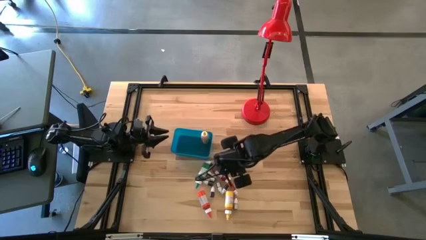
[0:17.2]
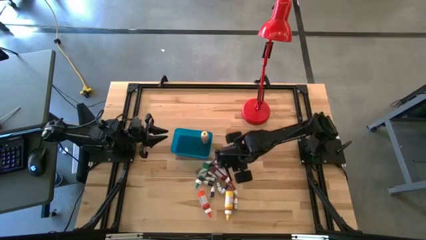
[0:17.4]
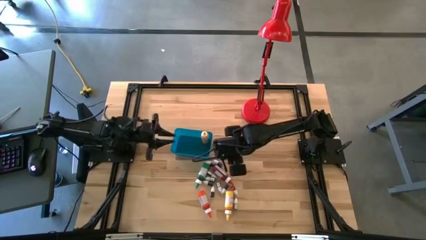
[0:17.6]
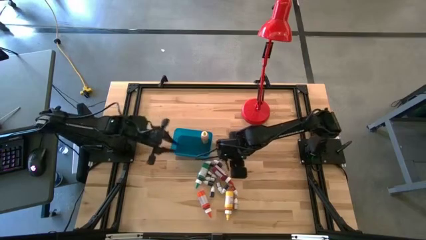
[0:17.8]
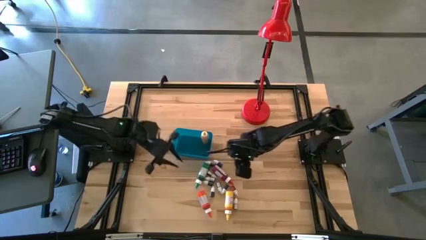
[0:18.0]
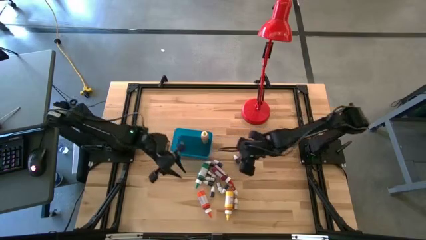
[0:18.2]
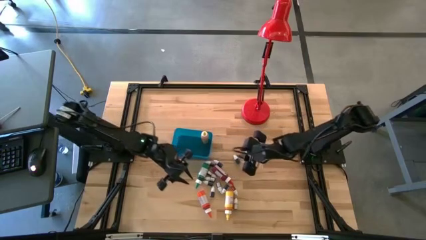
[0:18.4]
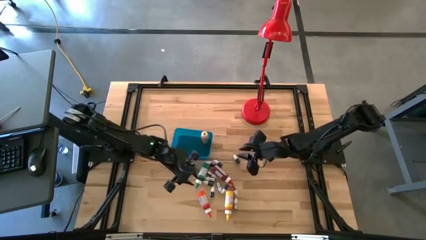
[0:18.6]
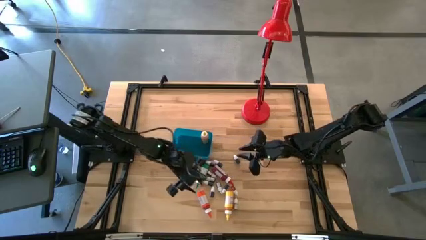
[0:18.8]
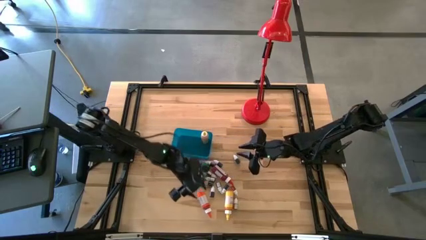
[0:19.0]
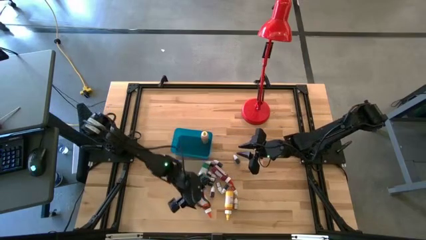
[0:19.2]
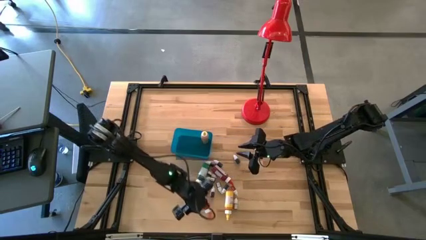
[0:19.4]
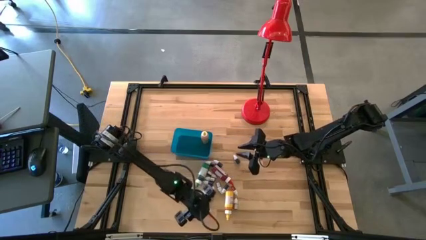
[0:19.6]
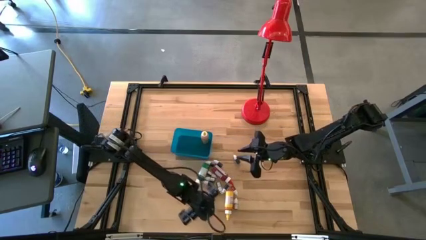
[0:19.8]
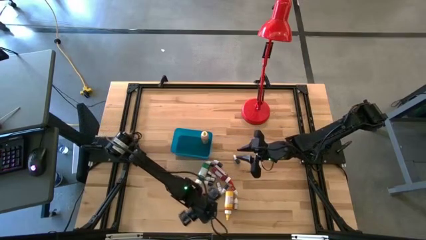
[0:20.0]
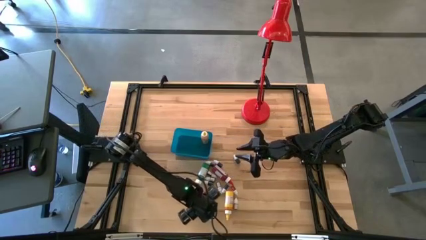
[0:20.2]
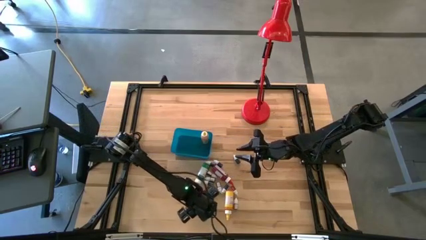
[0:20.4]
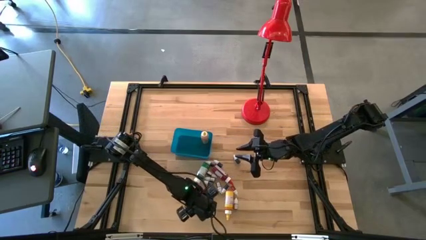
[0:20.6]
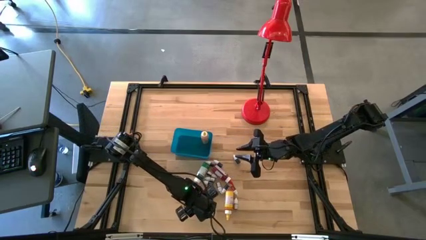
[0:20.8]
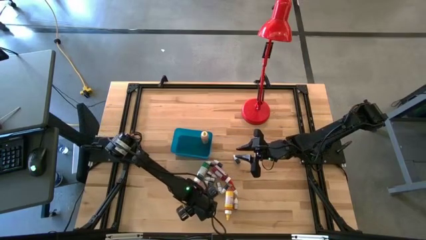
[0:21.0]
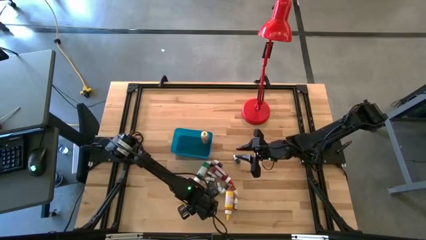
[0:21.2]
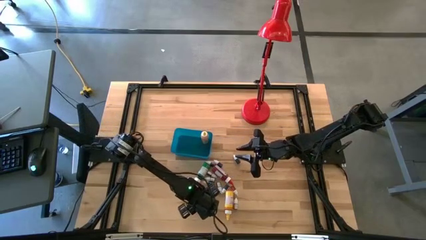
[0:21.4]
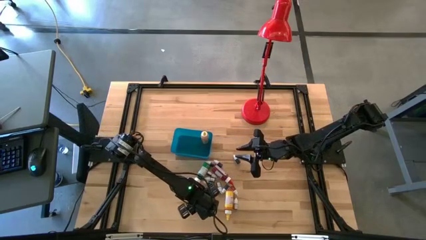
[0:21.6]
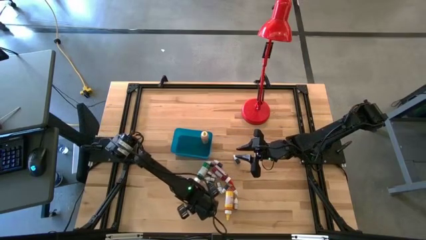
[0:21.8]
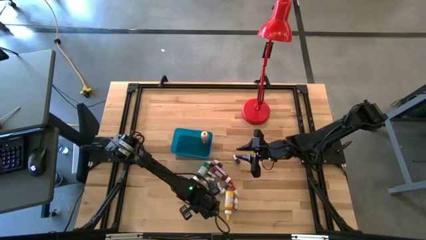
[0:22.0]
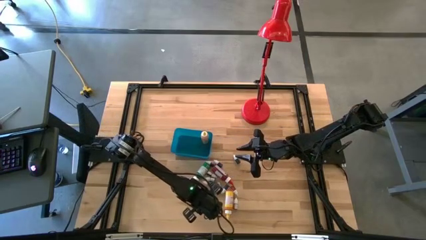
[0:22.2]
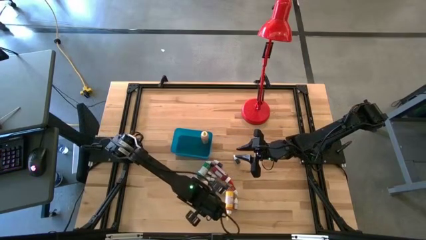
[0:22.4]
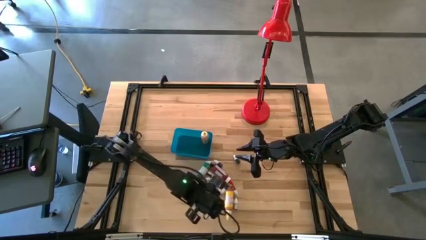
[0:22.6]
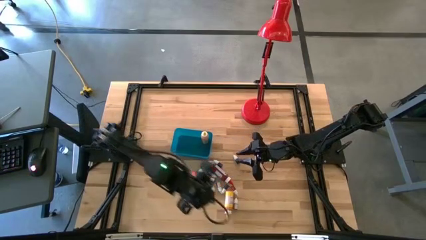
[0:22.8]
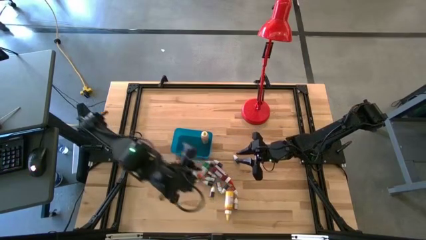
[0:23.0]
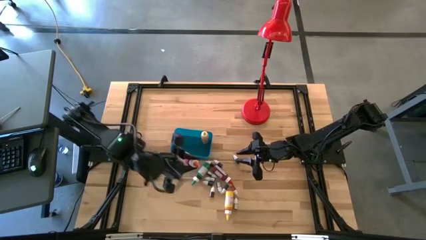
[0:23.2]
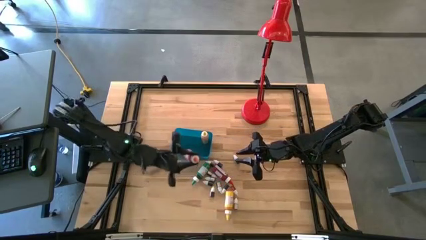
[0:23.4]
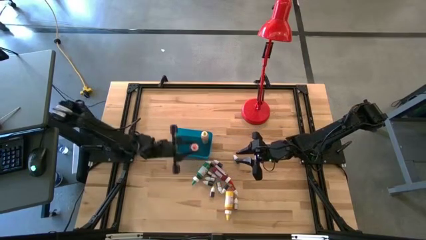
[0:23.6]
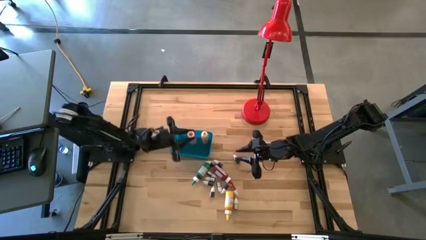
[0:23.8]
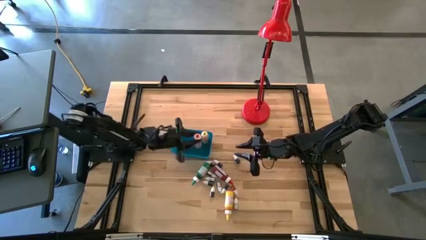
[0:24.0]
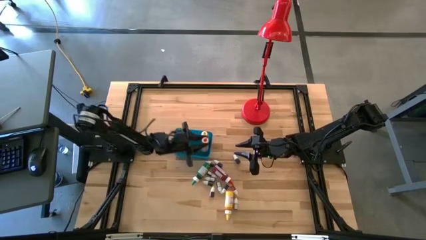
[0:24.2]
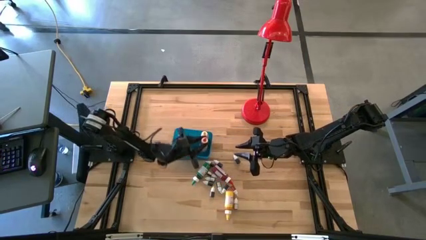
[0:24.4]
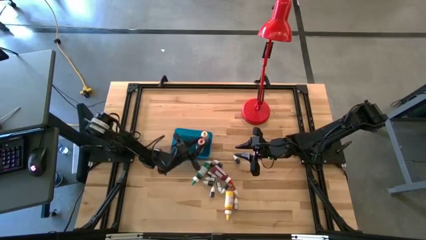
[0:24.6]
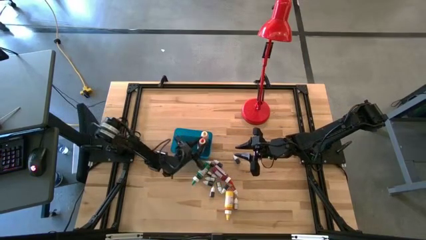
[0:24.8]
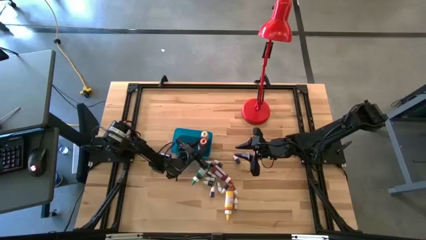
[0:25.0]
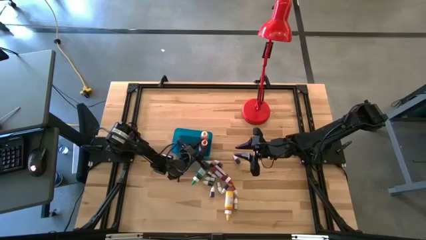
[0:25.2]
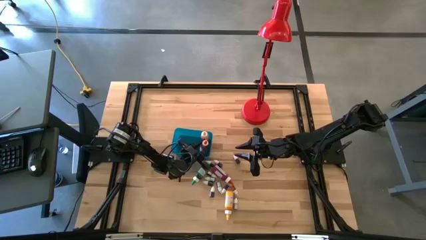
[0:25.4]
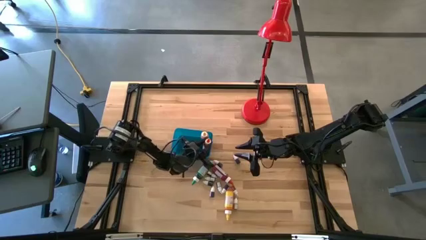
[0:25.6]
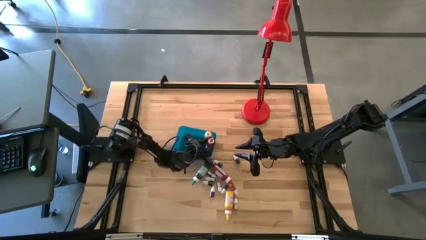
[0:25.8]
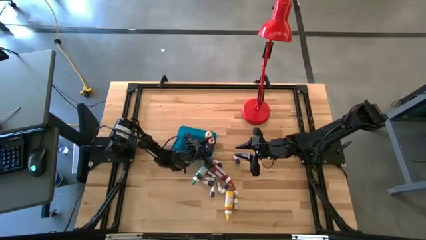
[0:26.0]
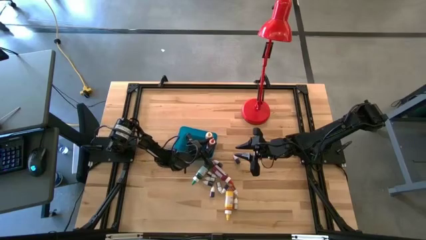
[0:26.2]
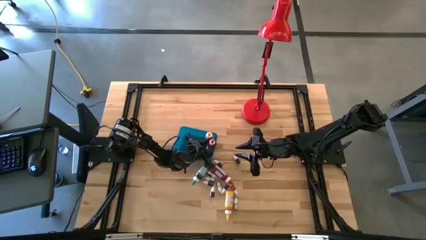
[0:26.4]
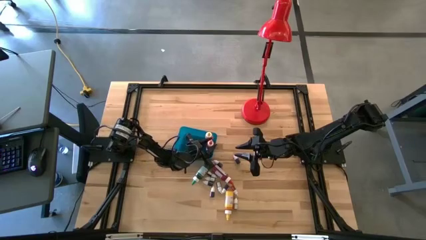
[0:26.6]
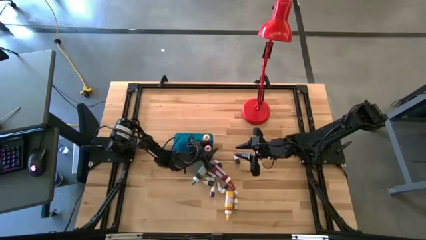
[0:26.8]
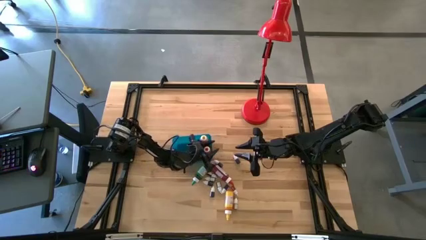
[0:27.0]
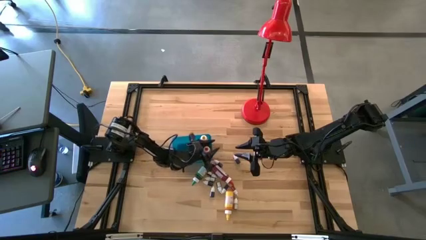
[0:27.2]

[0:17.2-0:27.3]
Task: Pick & Place food coloring
Put the large orange food coloring into the blue bin

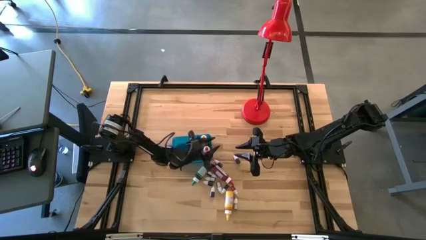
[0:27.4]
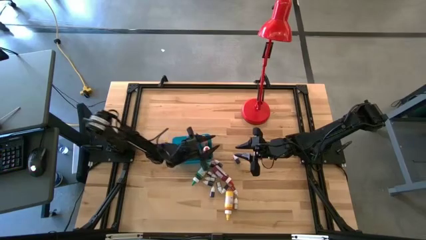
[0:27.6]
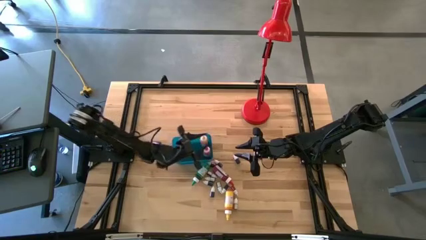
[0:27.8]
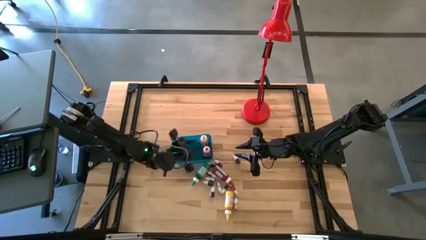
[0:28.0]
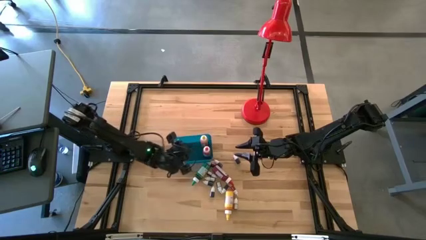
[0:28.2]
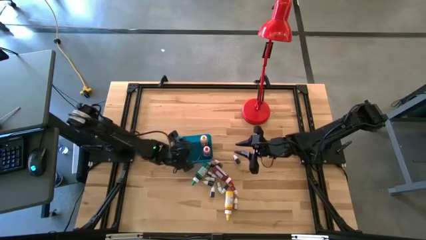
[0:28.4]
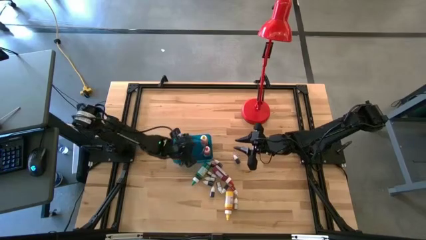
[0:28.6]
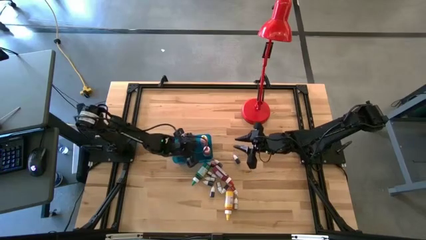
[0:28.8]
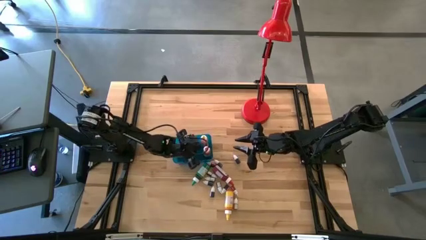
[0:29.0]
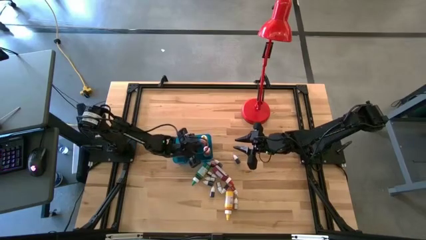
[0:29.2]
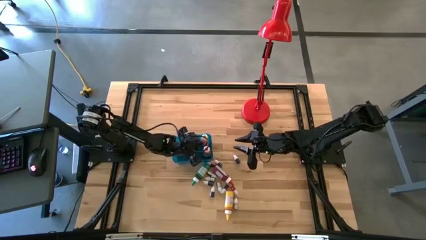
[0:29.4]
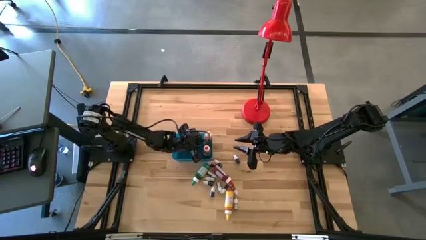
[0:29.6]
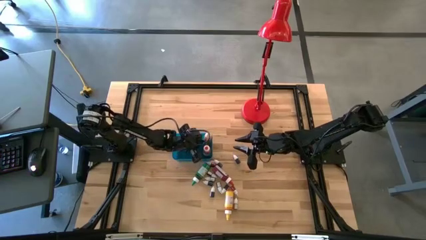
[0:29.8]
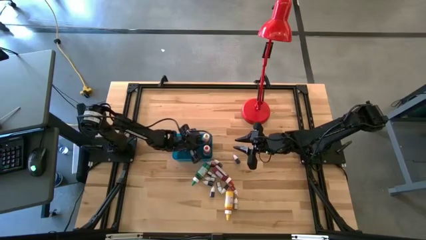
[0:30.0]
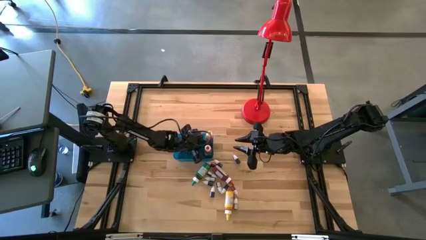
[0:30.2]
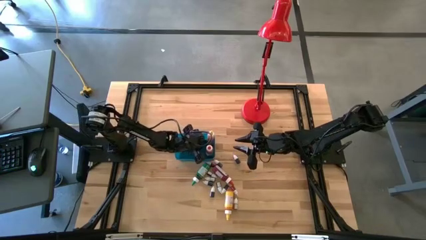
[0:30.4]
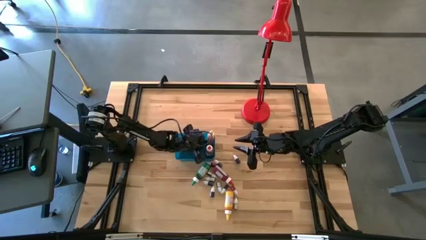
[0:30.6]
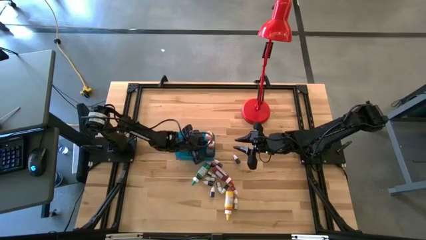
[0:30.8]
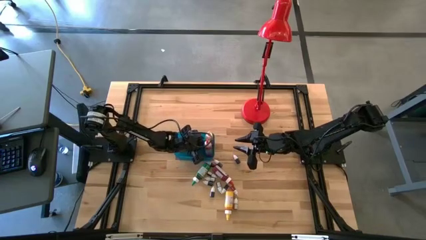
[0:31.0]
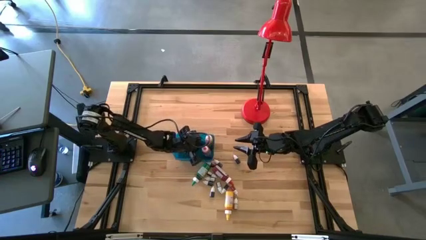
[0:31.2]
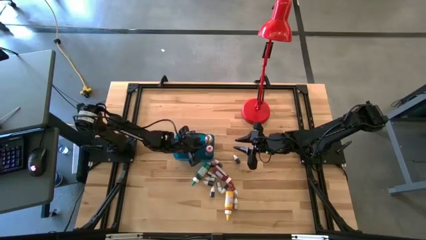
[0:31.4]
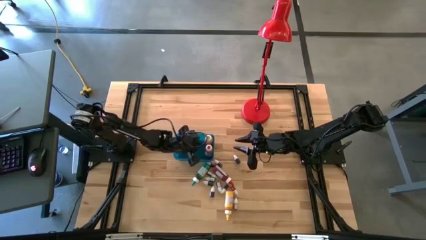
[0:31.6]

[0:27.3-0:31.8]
Adjust the large yellow food coloring in the blue bin

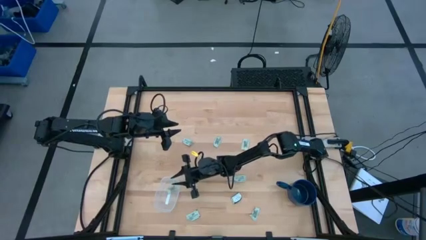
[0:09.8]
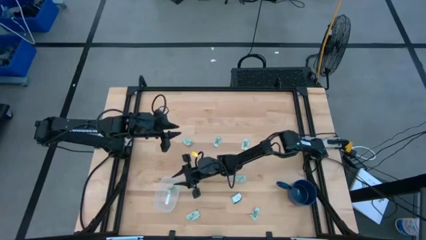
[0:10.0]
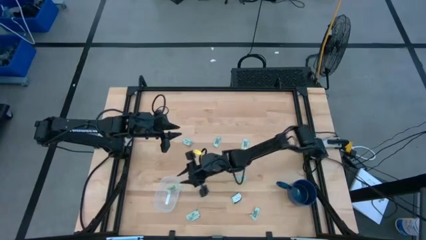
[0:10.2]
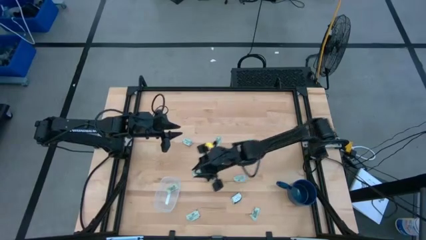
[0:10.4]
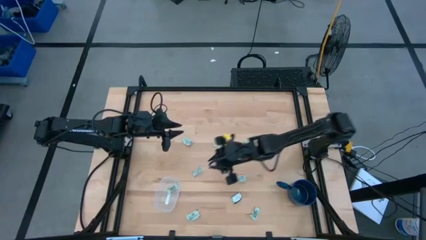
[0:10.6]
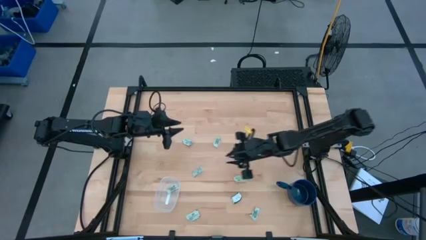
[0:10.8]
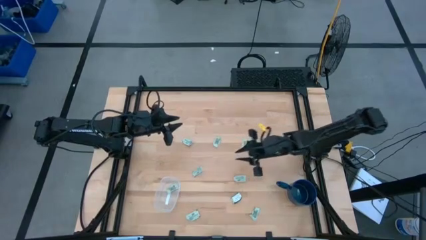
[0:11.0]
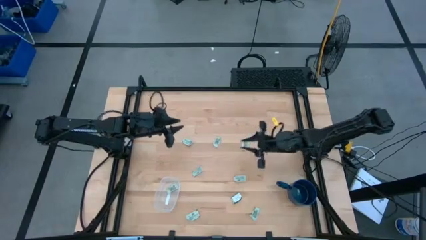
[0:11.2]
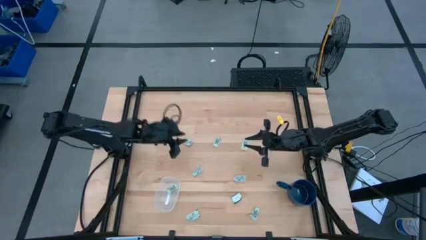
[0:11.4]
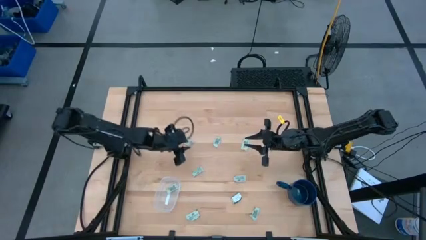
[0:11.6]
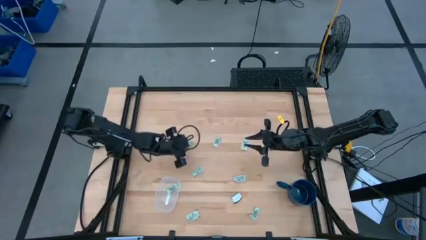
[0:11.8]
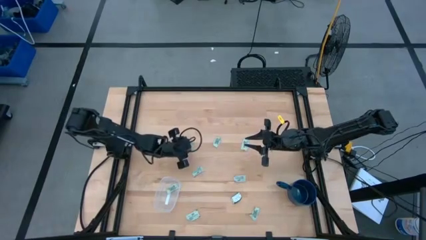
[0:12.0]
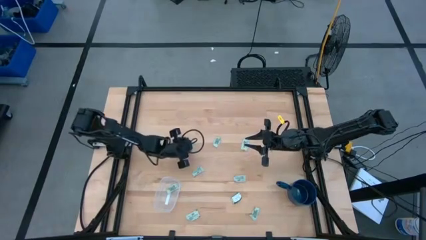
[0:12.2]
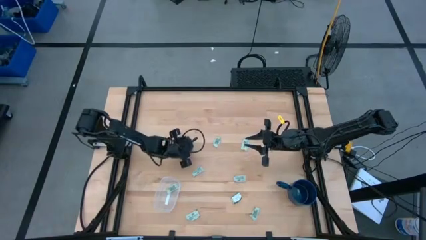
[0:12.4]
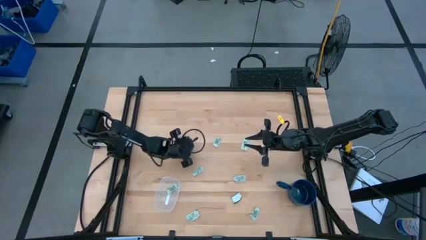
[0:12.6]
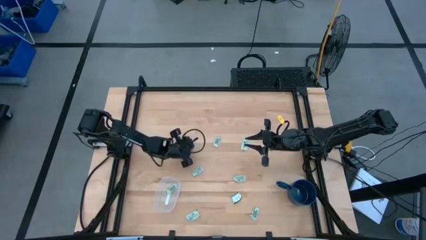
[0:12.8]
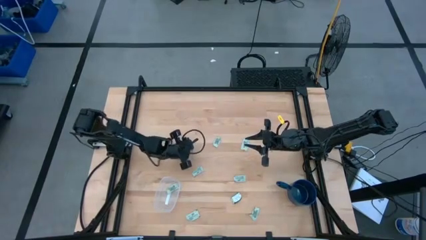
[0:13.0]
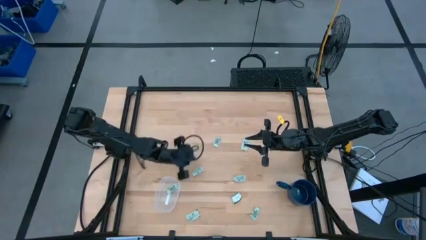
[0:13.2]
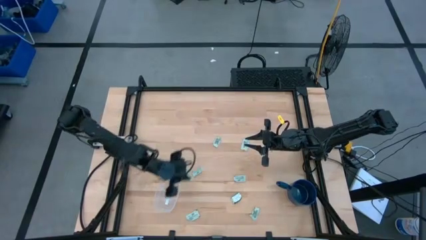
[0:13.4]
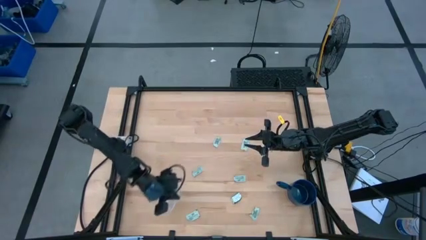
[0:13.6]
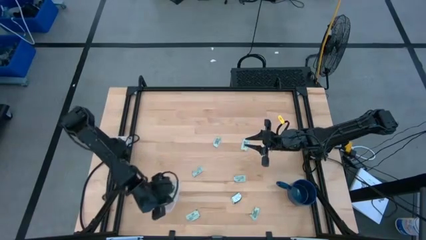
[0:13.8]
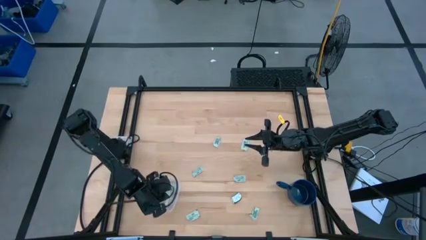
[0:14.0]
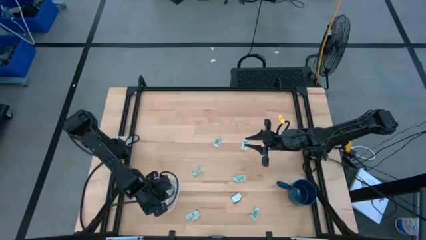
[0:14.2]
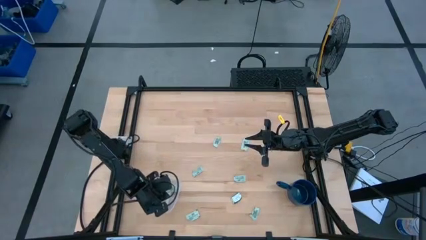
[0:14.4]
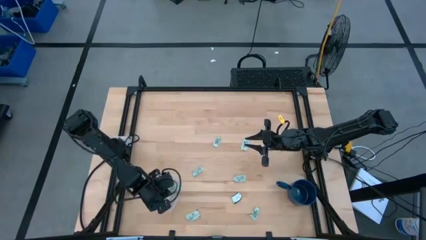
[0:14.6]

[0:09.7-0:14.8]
Task: Pick and place Stevia / Truvia into bins
Put the stevia packet into the transparent container
